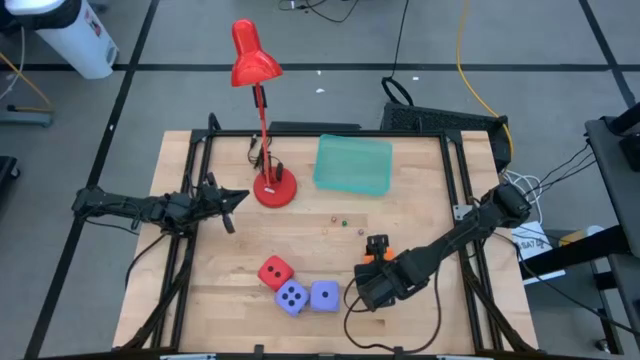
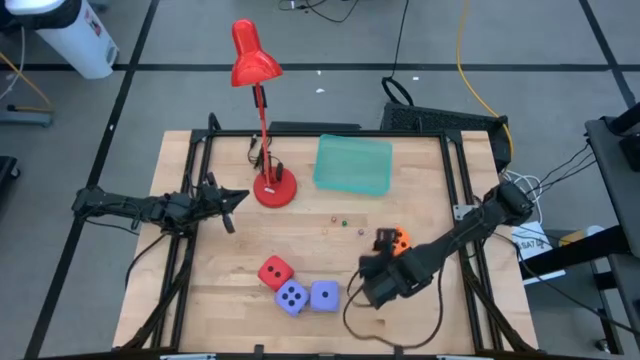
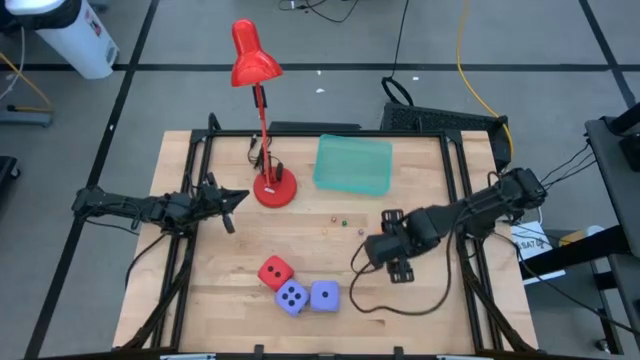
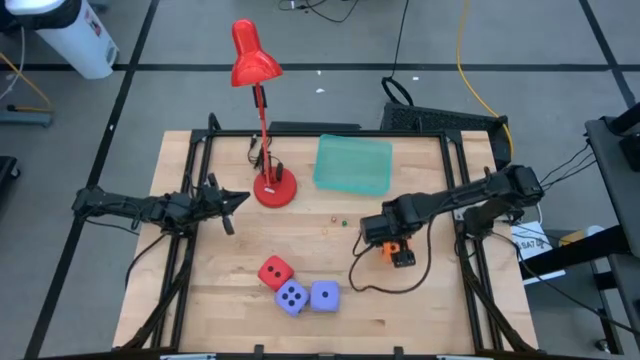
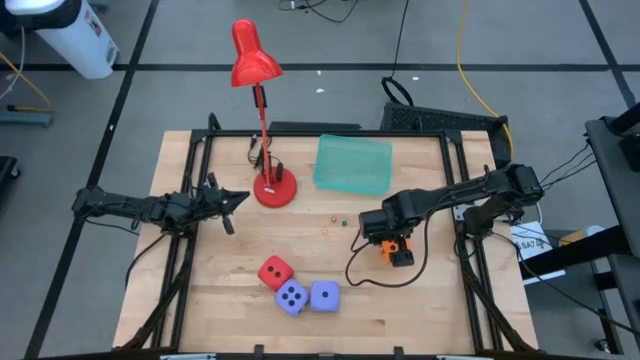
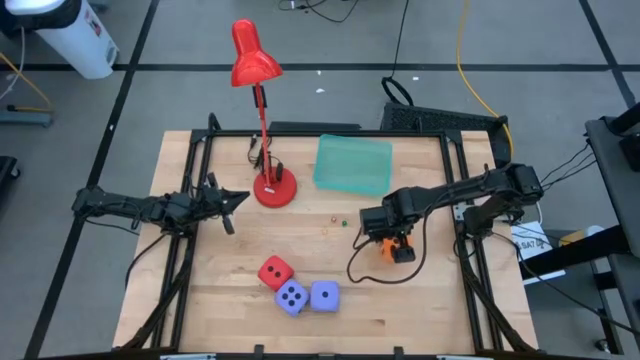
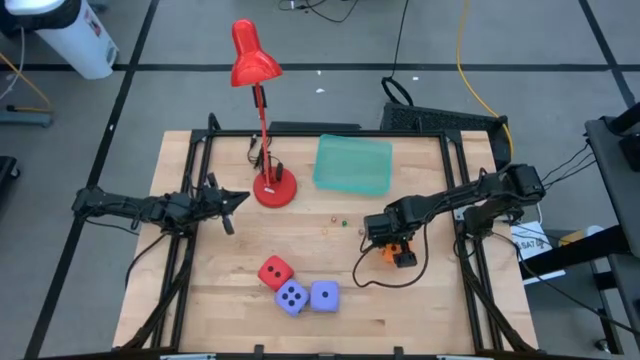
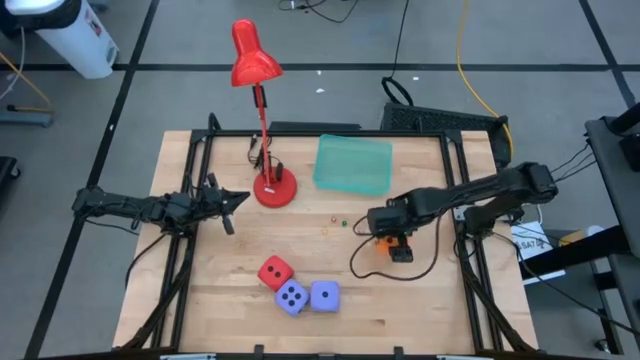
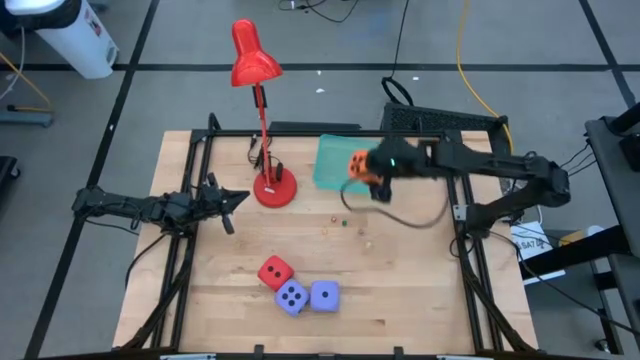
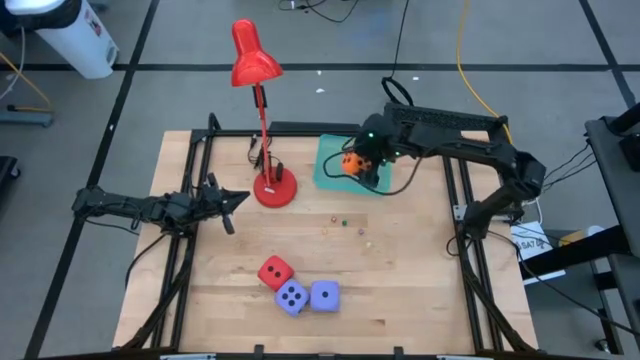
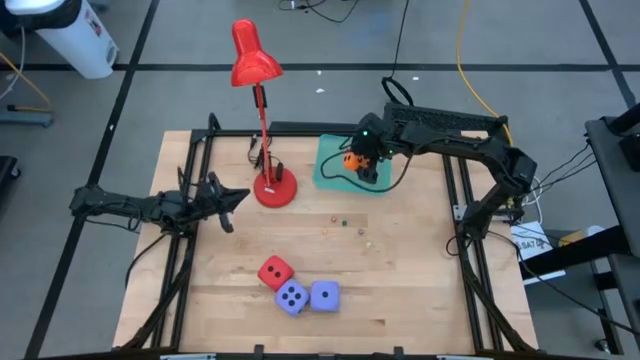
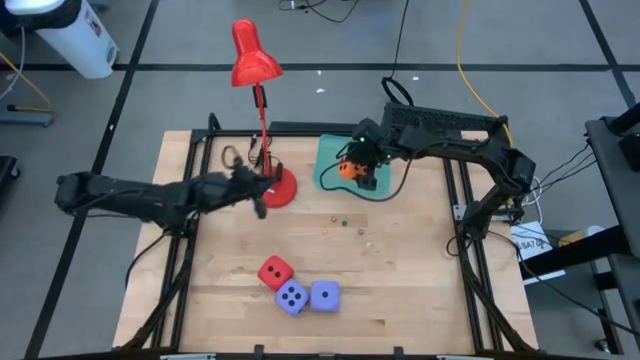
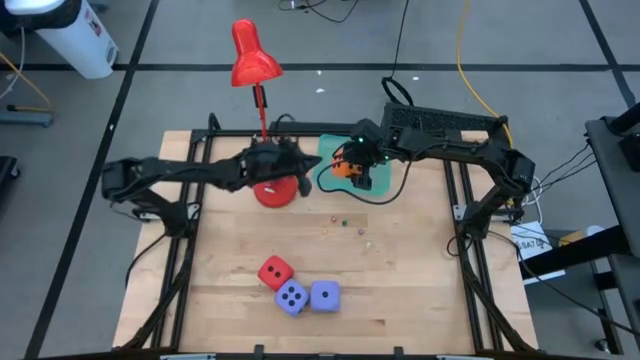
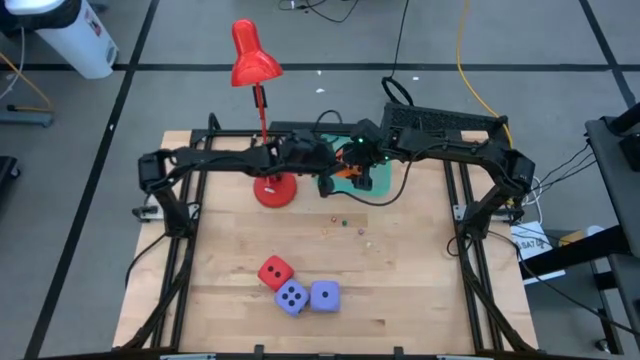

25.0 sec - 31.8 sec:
Task: Pick & Place Dice
Put the big orange dice into the green bin

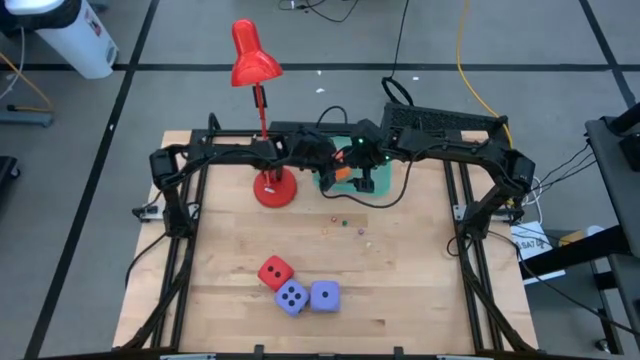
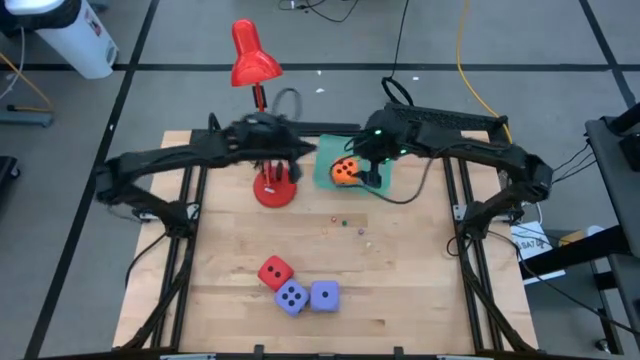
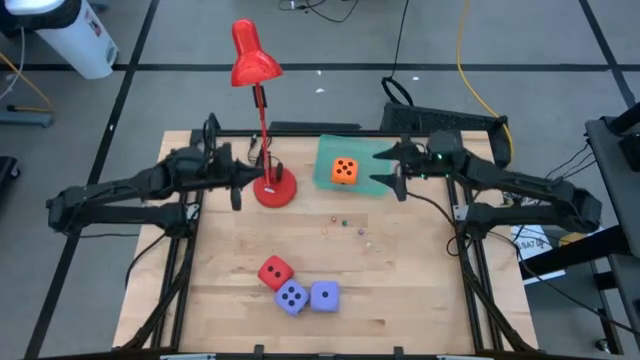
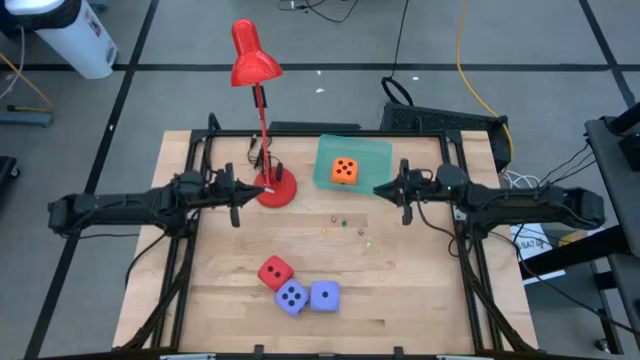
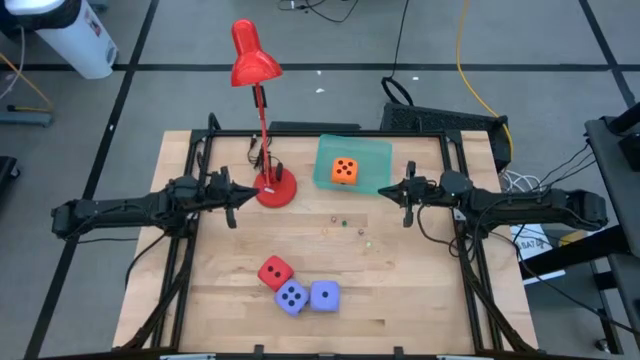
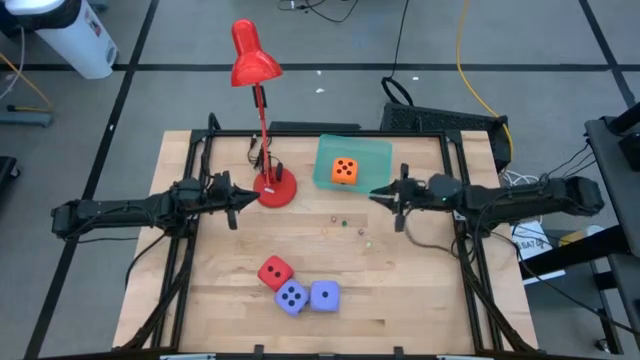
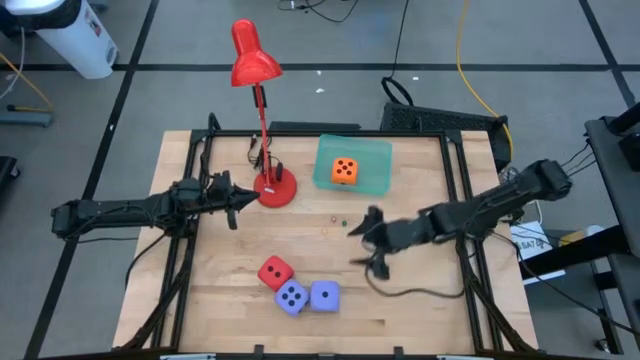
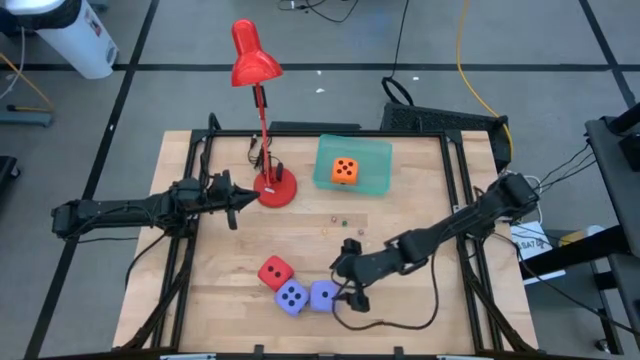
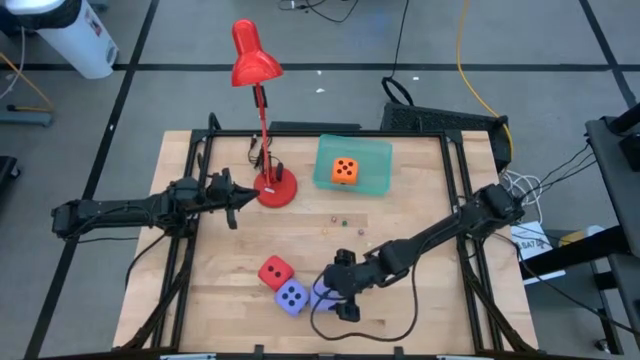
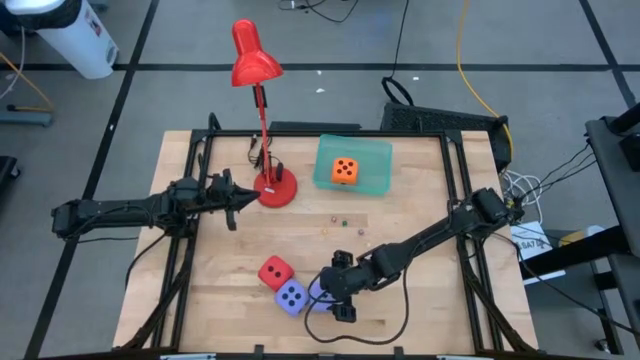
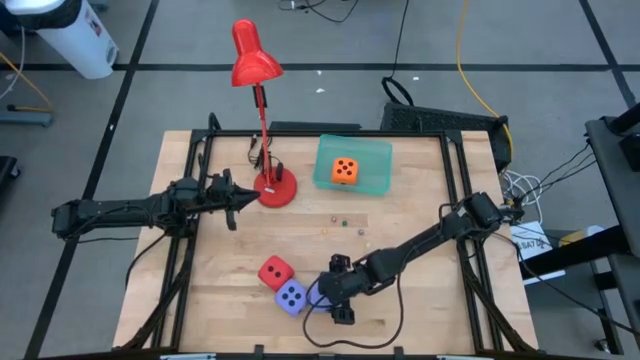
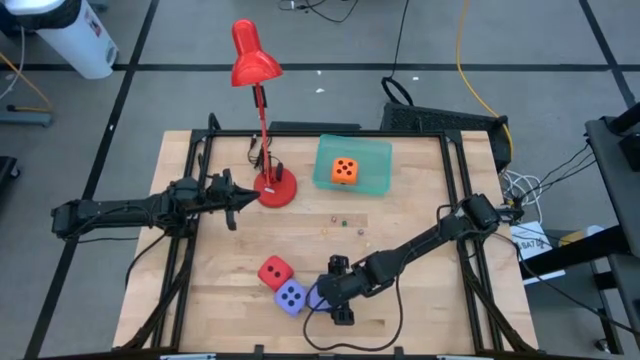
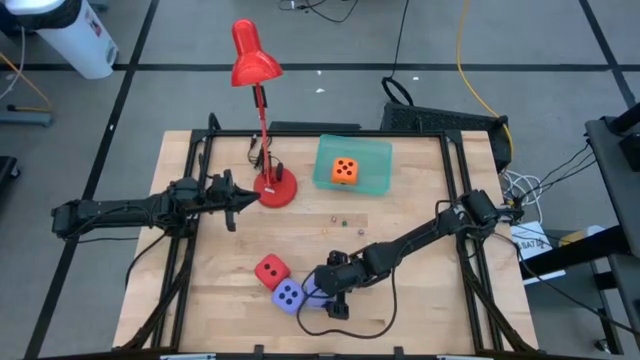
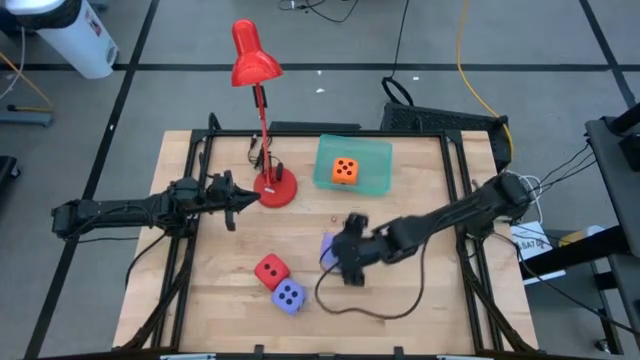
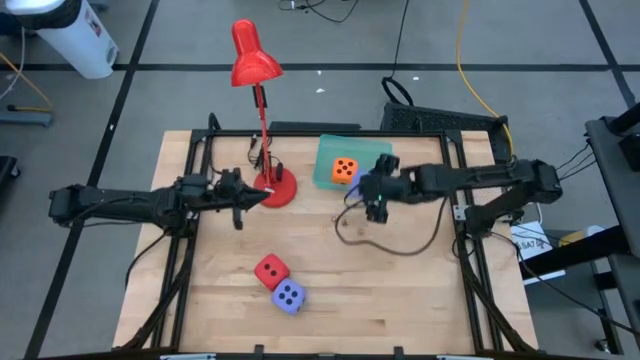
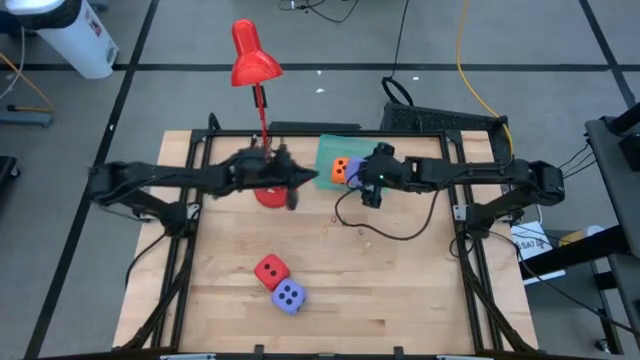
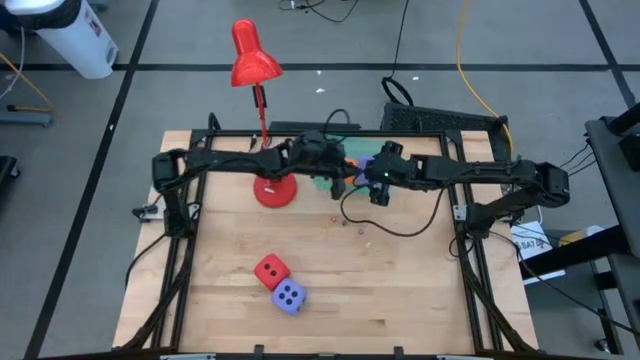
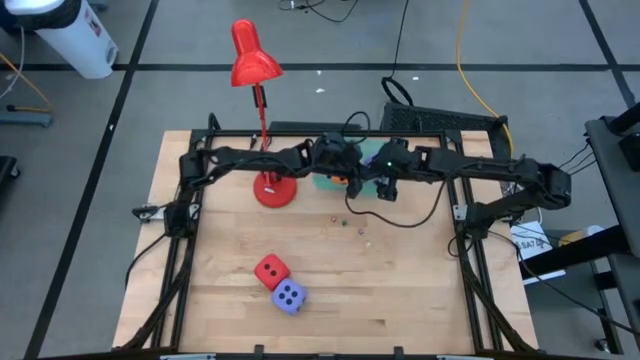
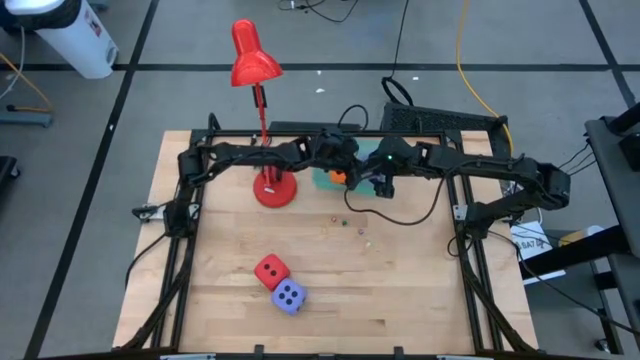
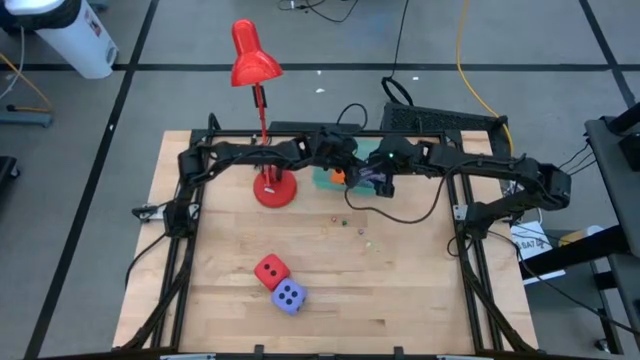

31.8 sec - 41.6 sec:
Put the right big purple dice into the green bin
